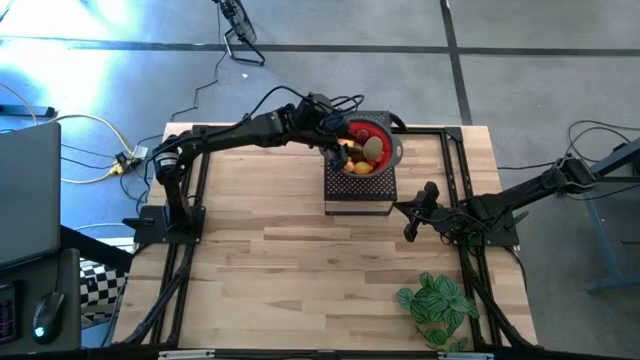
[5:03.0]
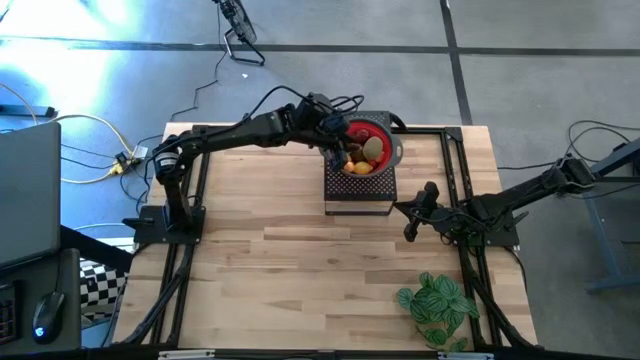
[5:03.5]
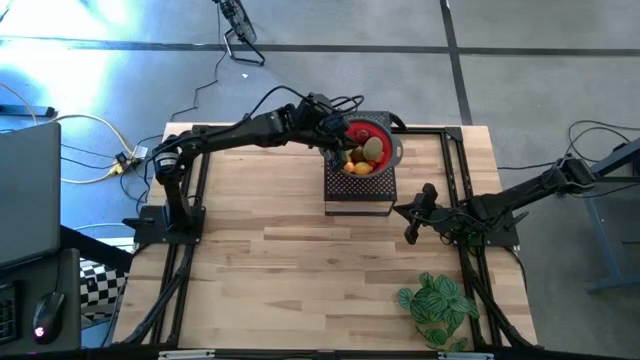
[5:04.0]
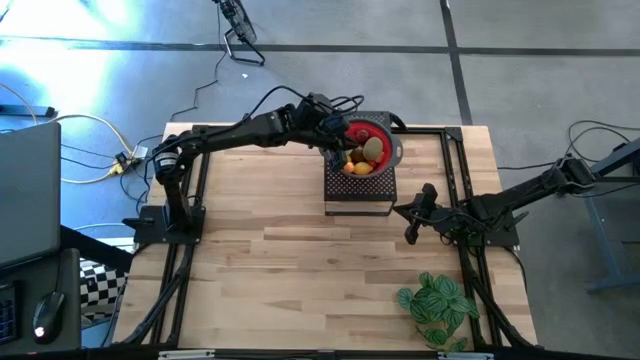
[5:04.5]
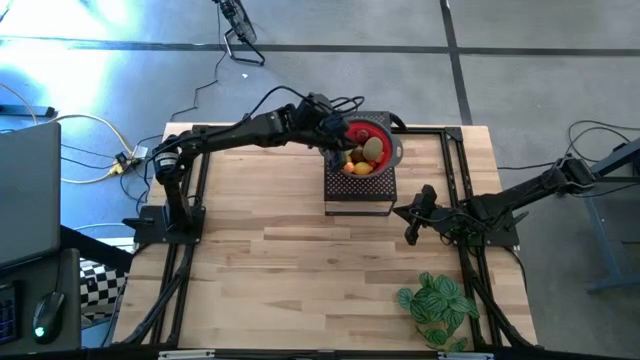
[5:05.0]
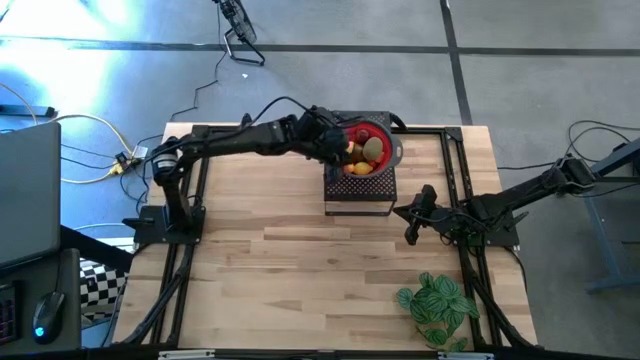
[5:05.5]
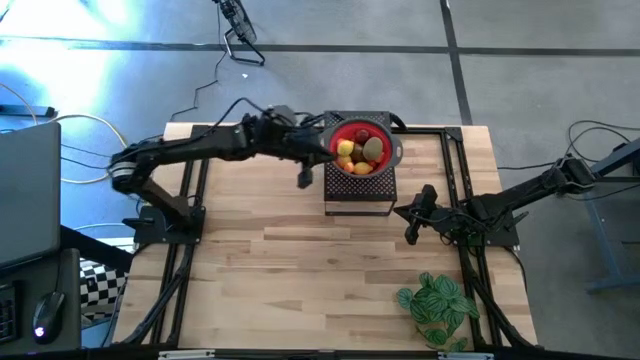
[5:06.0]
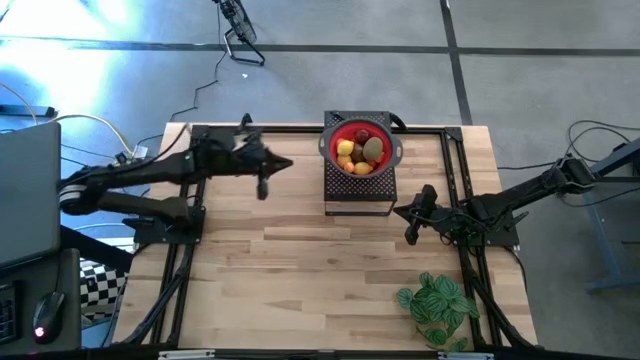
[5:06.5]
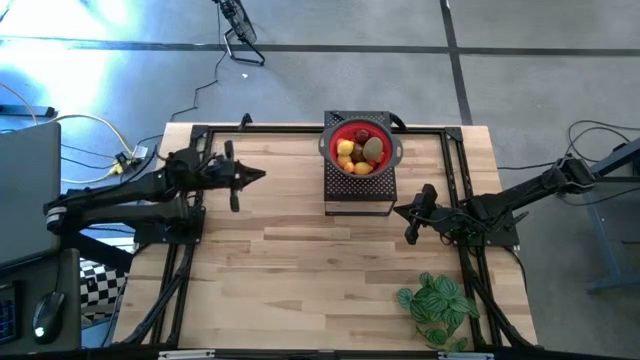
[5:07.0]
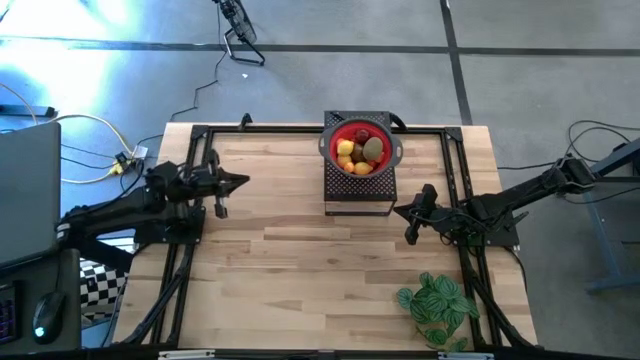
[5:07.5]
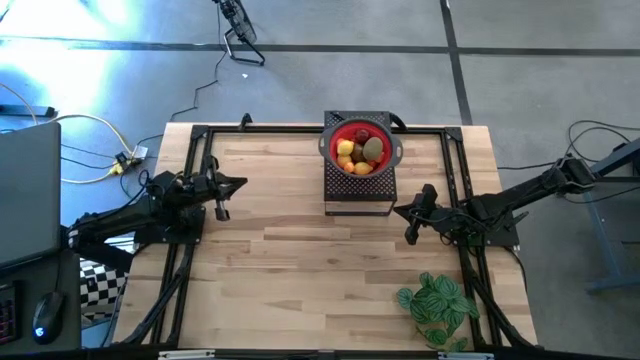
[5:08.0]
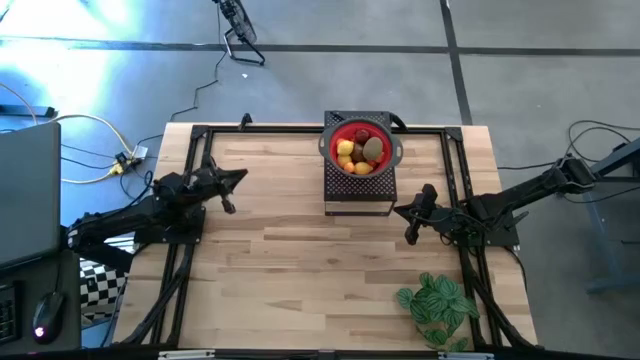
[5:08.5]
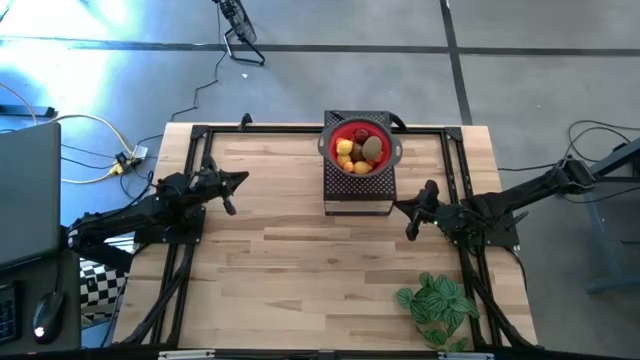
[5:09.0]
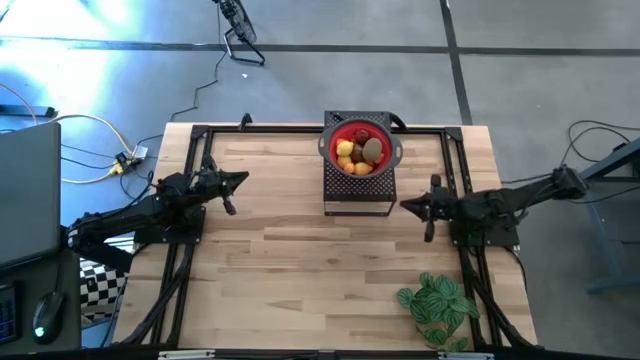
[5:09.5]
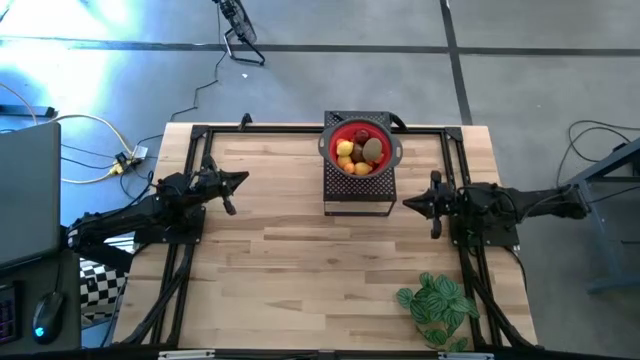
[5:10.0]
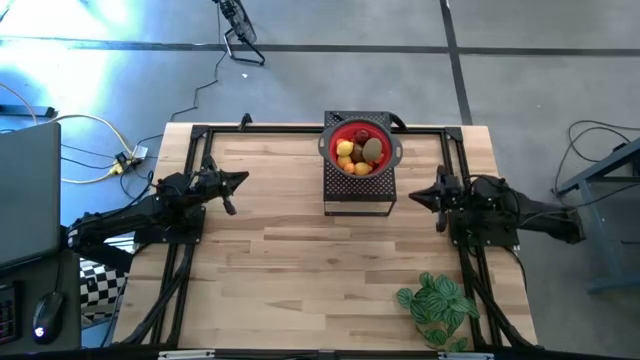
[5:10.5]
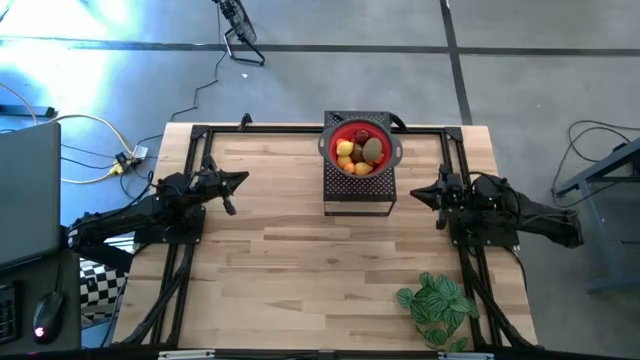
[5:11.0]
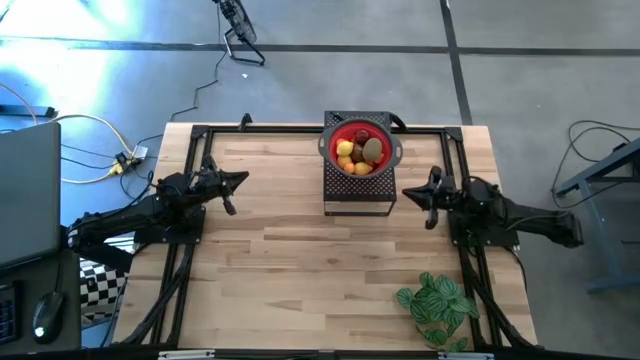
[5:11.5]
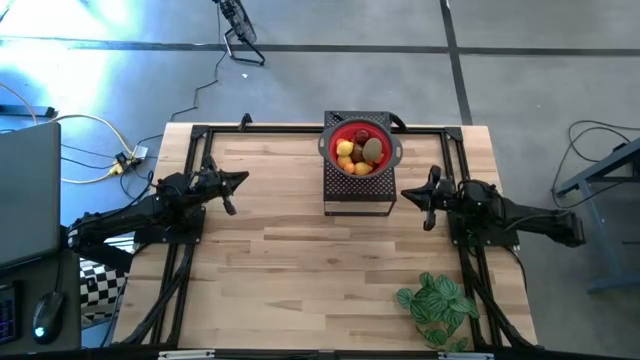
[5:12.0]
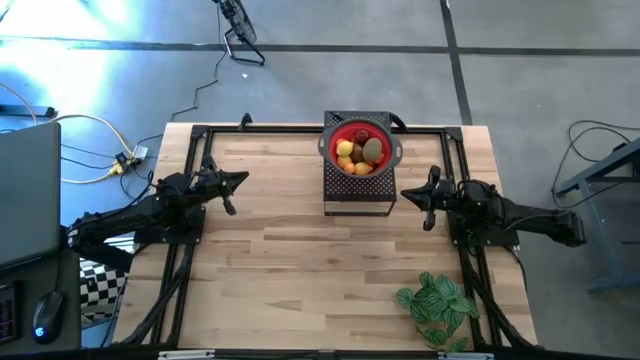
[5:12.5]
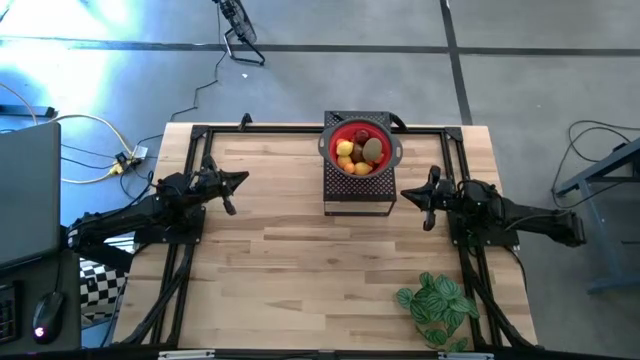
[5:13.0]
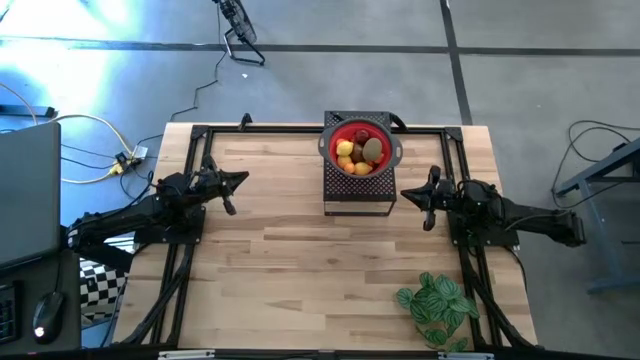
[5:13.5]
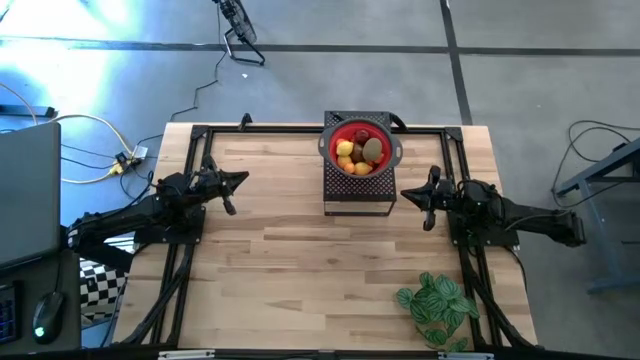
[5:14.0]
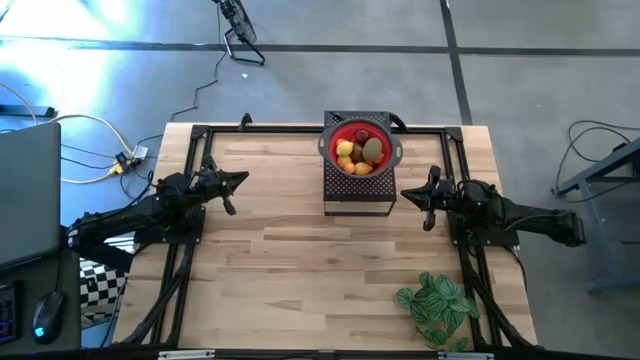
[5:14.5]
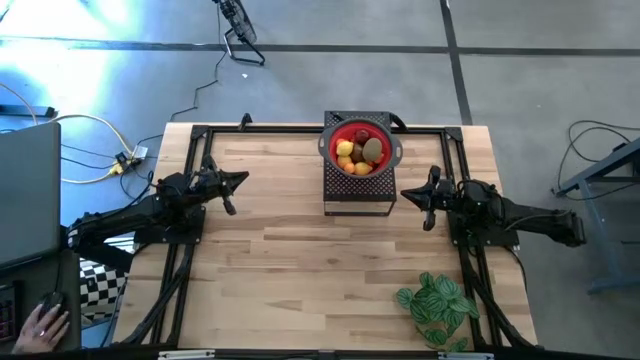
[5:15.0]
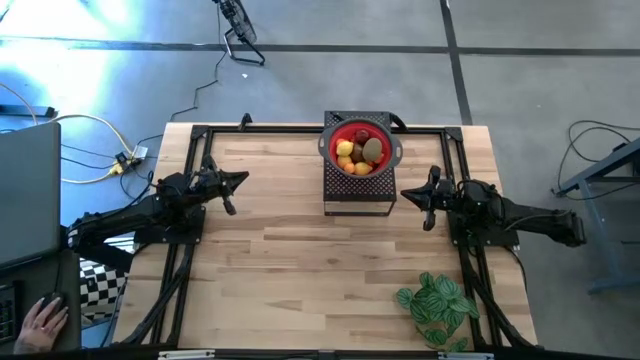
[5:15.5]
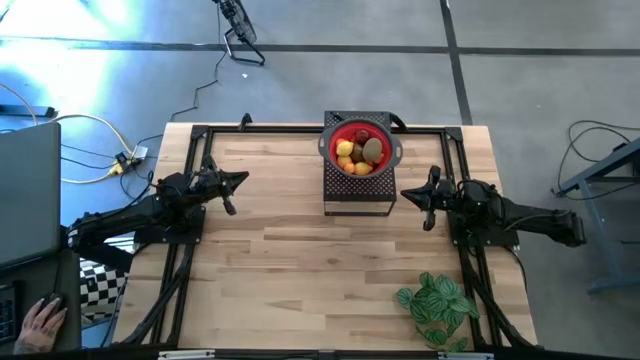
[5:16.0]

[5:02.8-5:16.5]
Task: Pick & Place Fruit
Return to Home Position

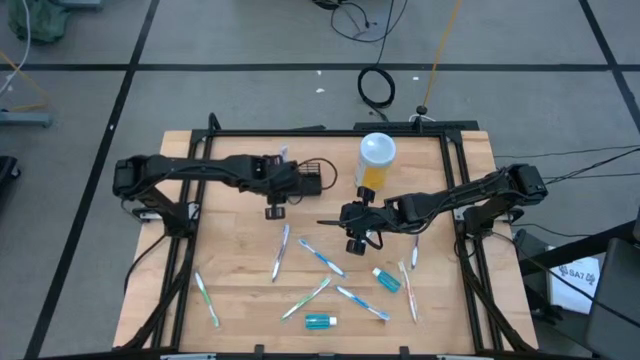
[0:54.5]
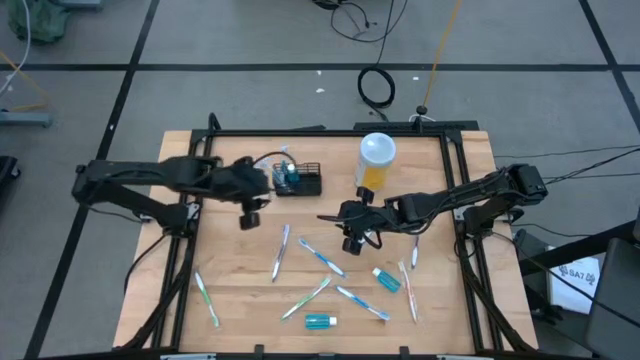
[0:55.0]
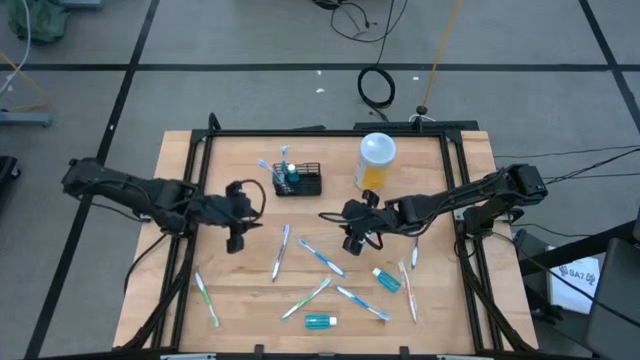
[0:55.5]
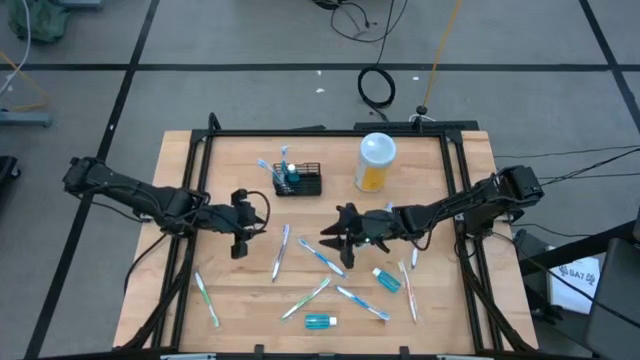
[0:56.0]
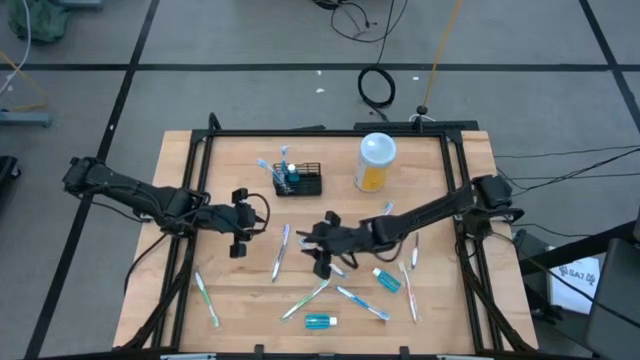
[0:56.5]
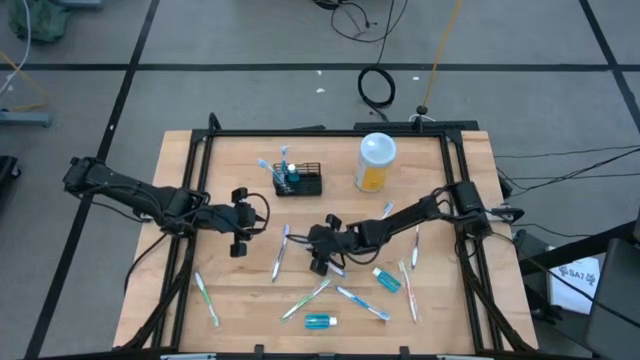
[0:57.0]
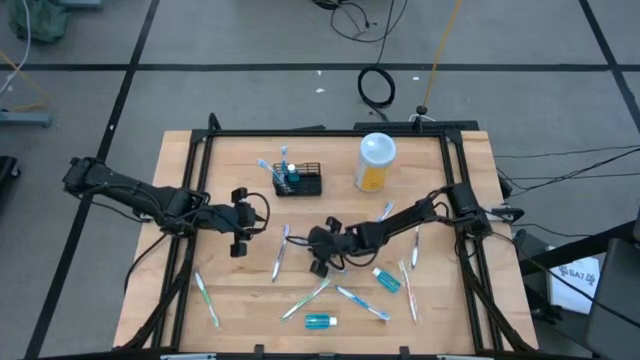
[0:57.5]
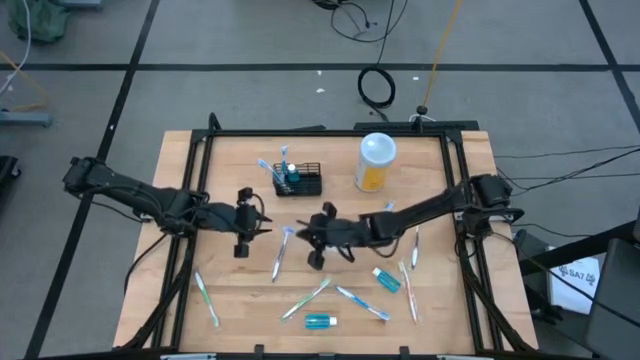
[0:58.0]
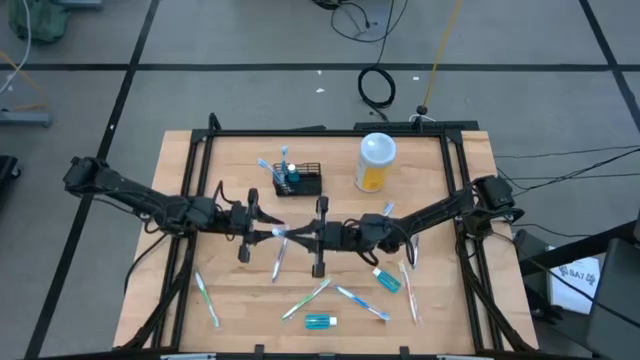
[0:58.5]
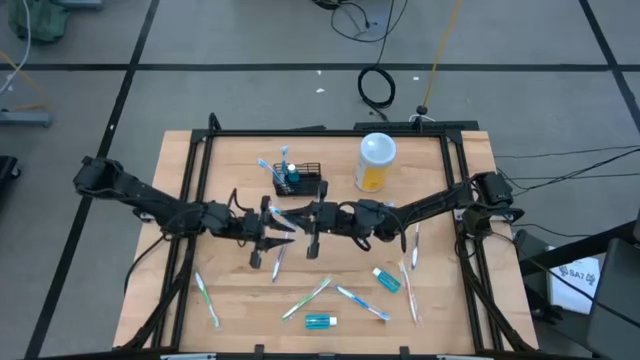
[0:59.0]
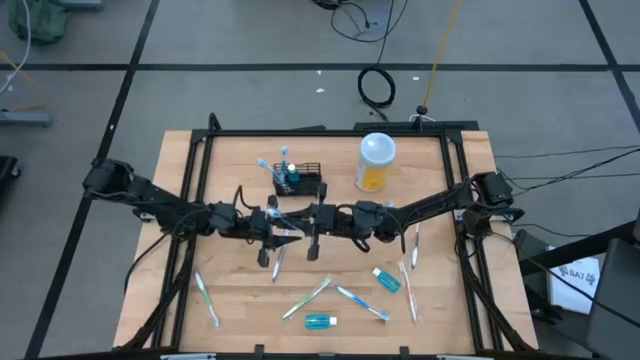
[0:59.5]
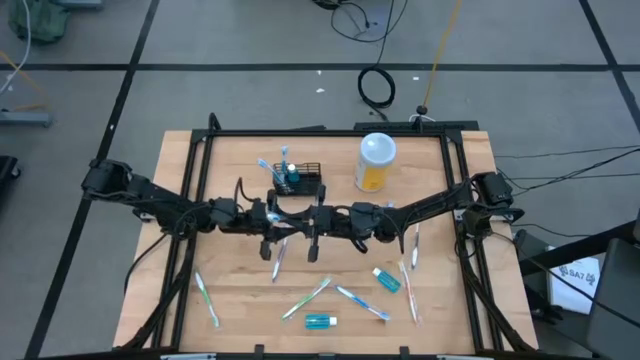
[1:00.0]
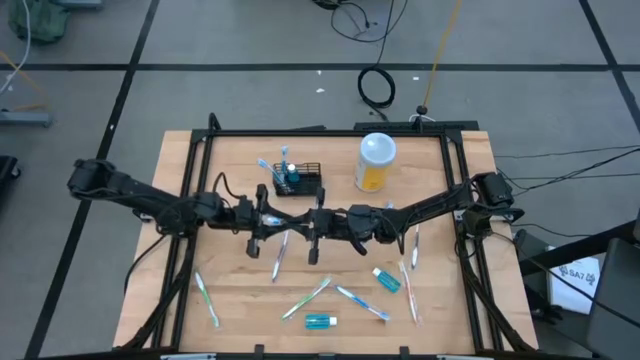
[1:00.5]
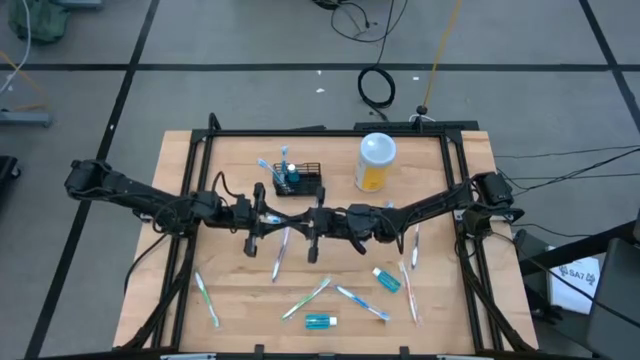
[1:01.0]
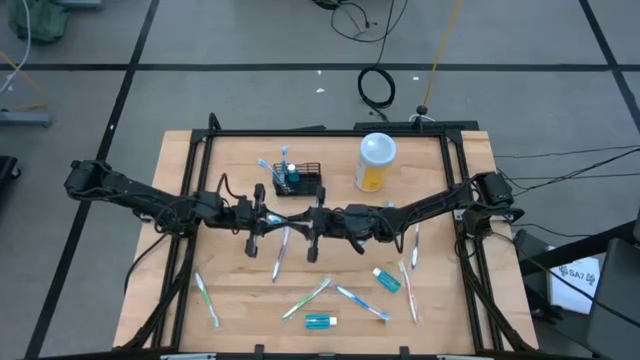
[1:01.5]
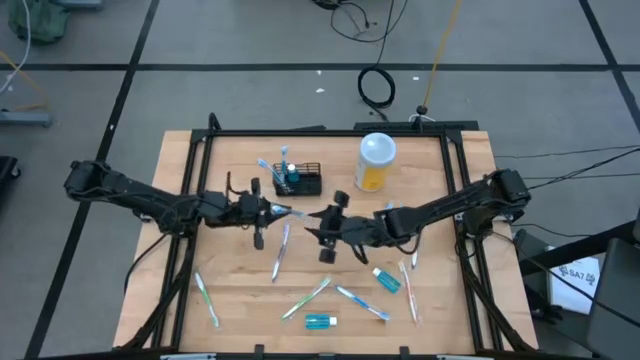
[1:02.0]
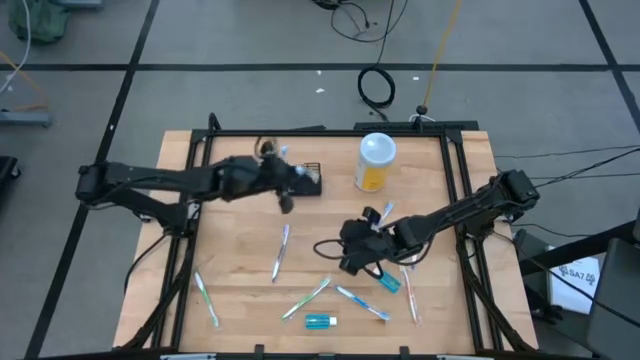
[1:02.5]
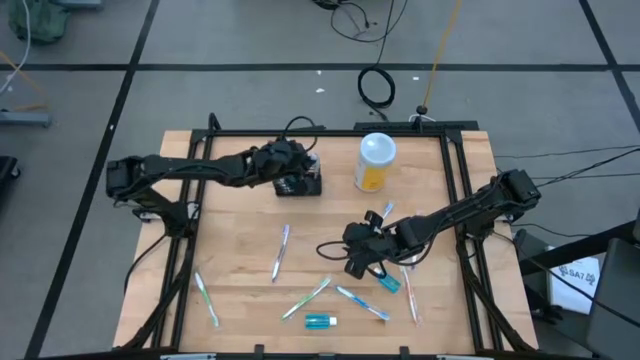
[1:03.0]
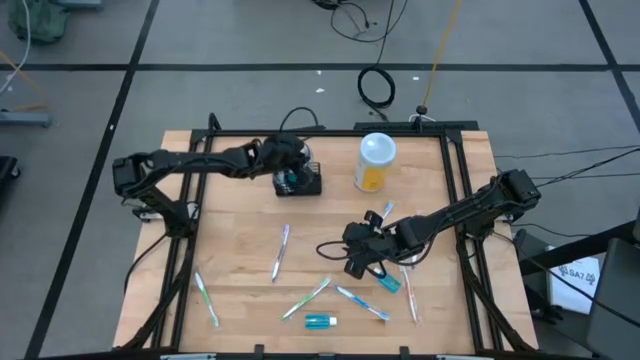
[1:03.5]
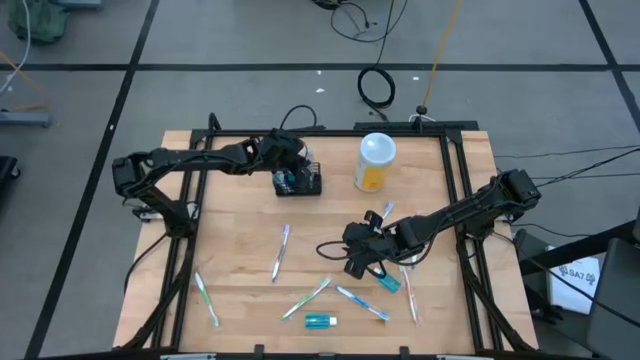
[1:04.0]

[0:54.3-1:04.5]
Task: Pick & Place toothbrushing station
Put the blue toothbrush into the black mesh organizer
